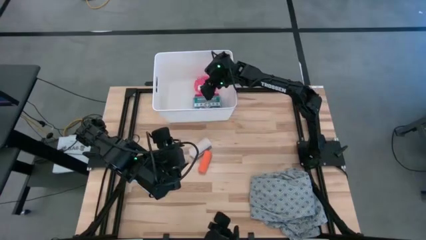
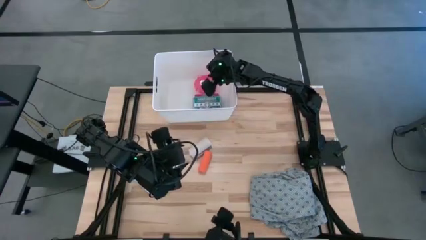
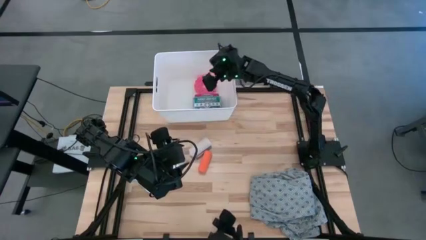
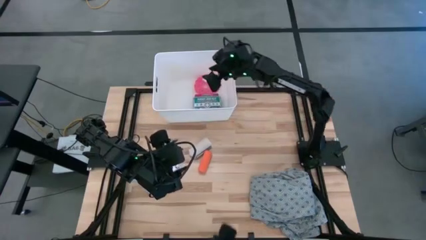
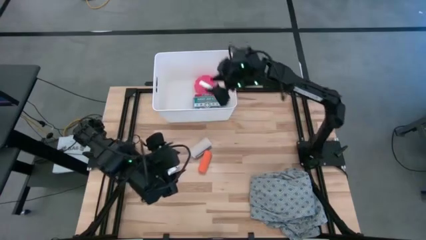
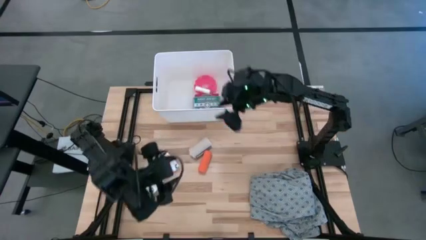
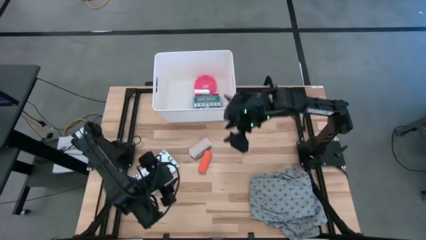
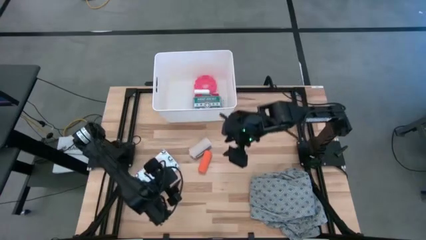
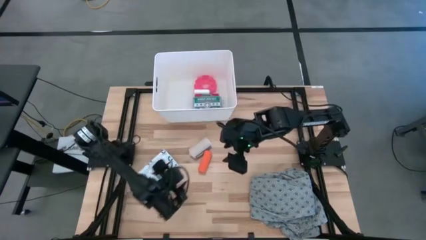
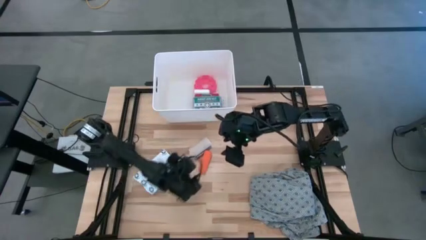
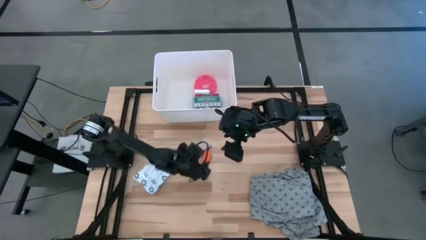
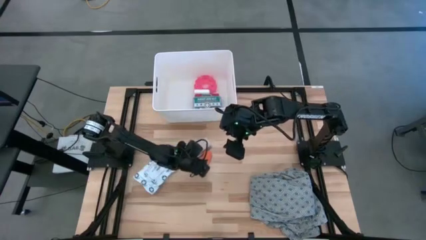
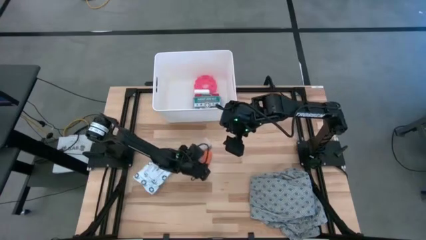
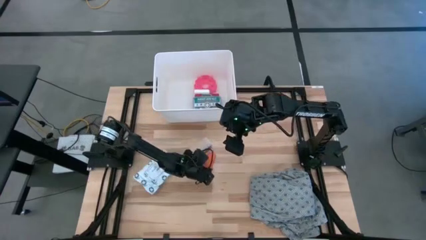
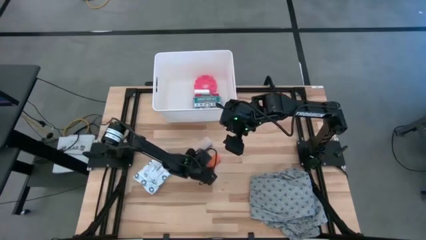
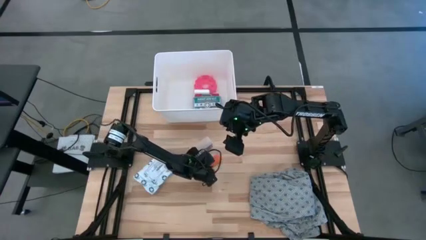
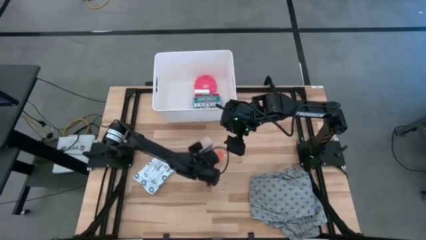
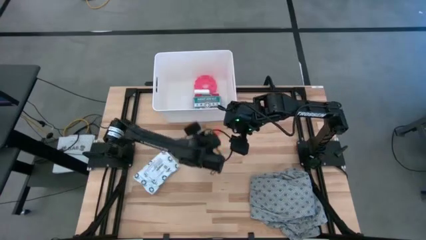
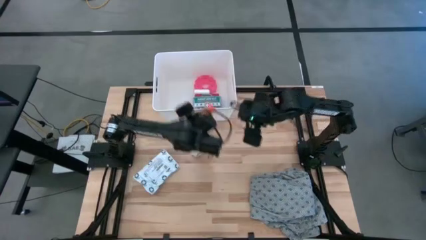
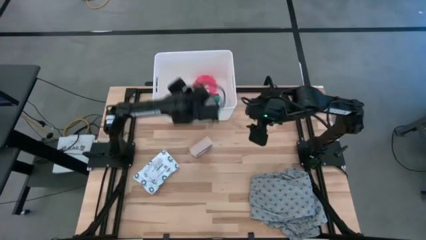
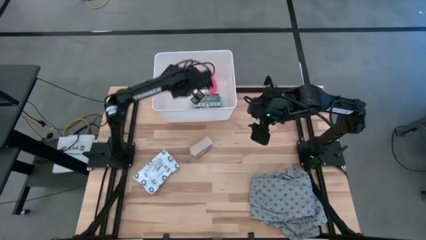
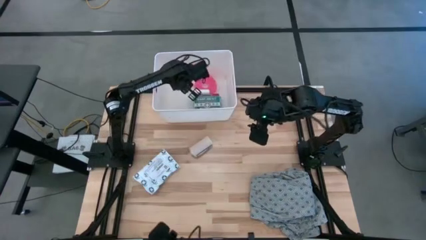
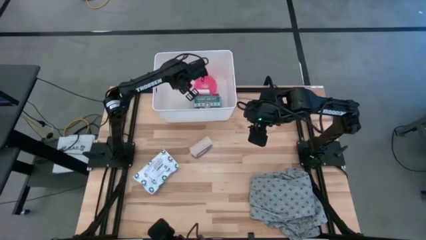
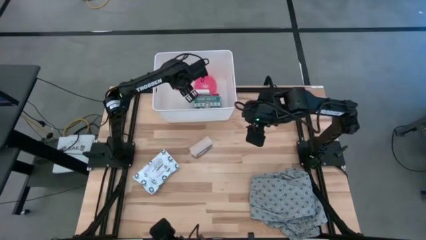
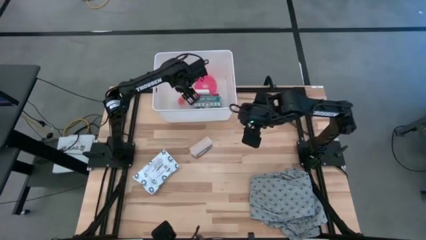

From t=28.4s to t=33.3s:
Task: Pick & place medical supplies in basket/bin
Put the orange bandage into the white bin

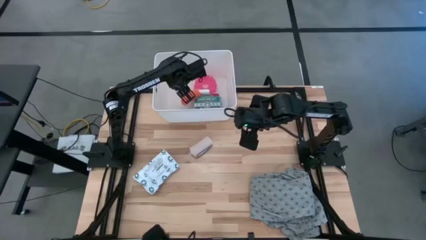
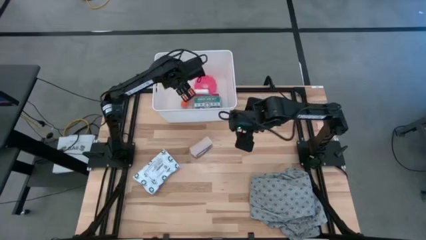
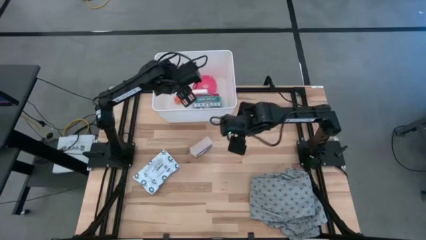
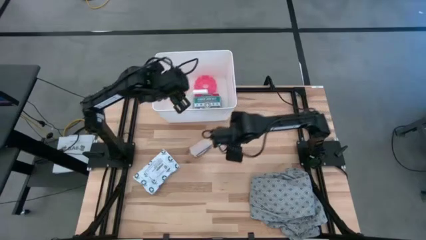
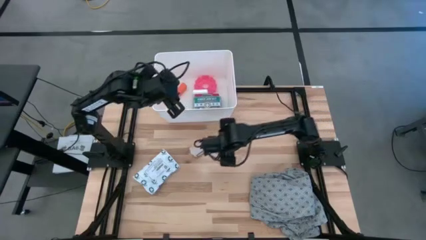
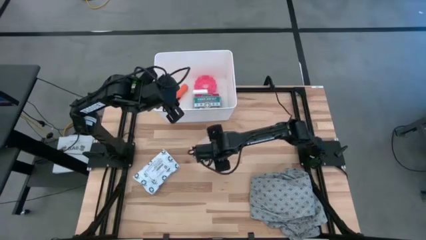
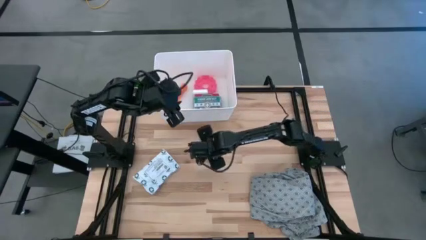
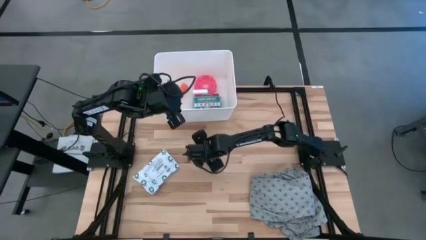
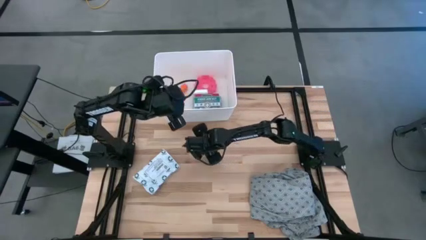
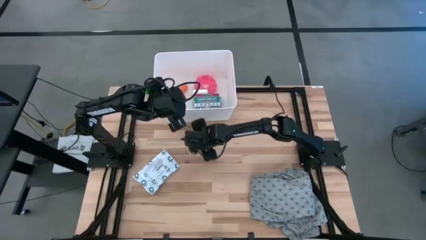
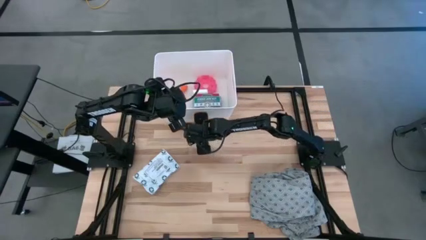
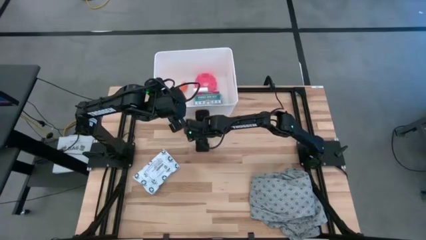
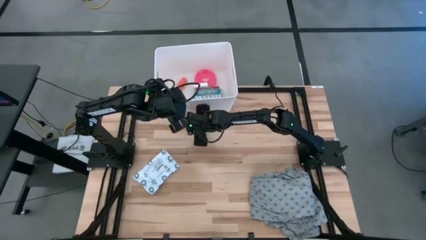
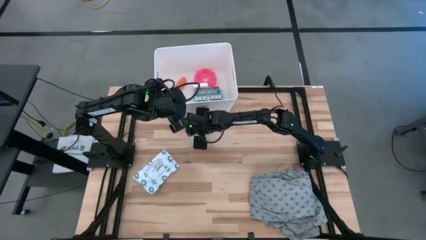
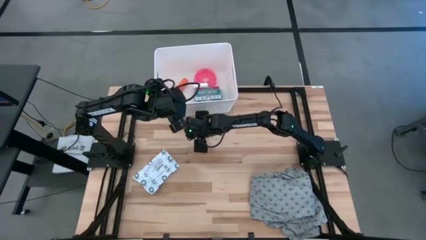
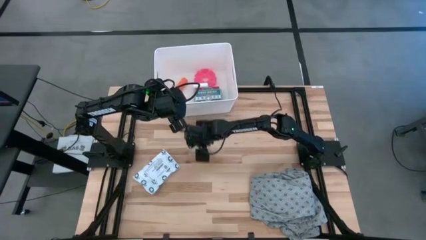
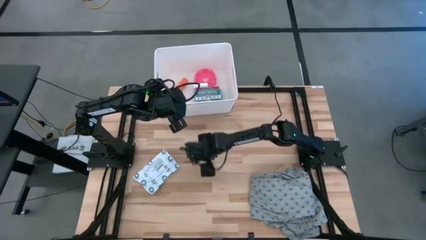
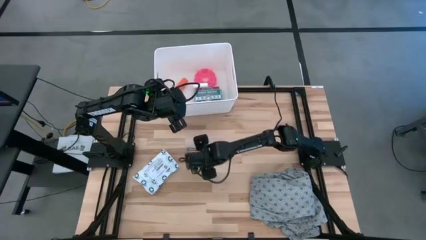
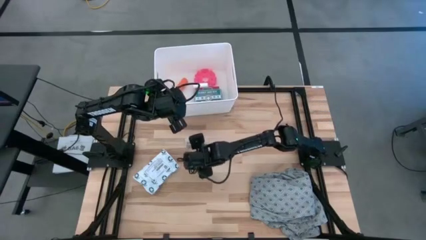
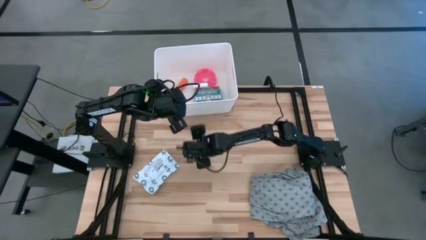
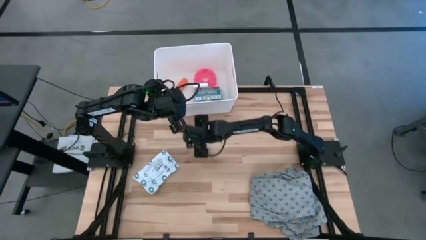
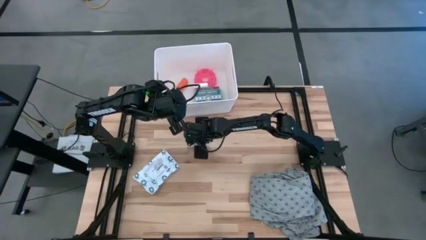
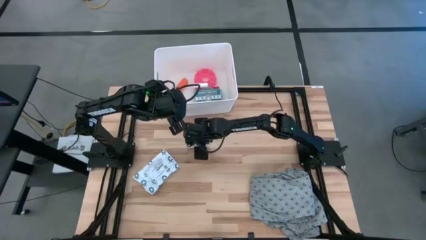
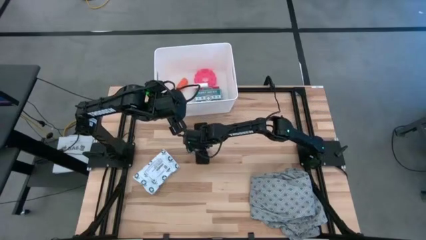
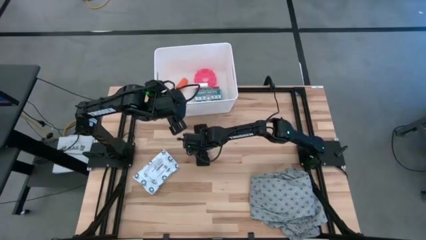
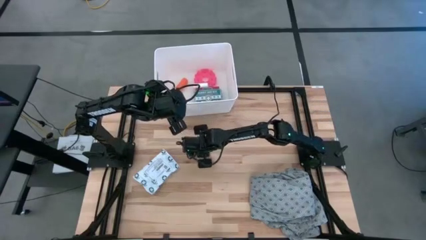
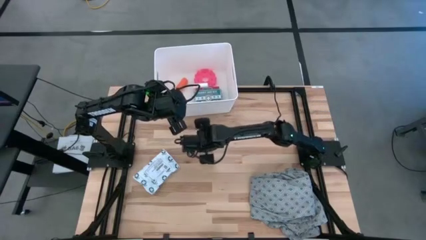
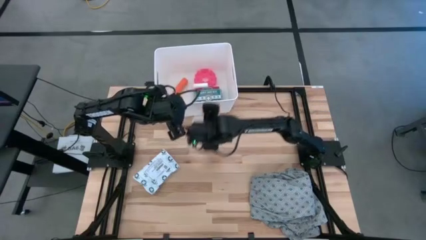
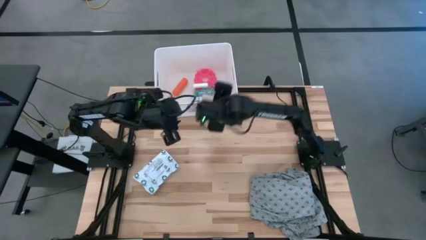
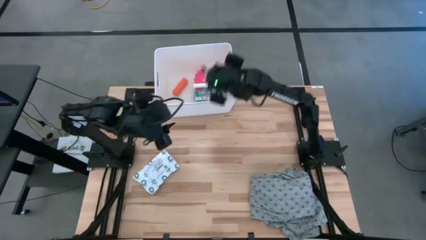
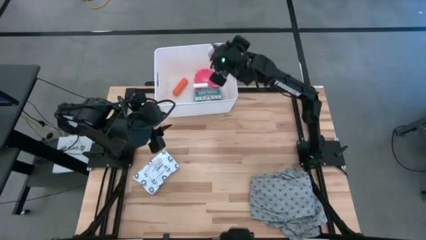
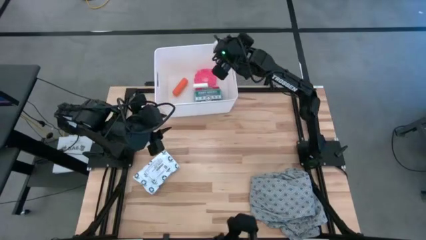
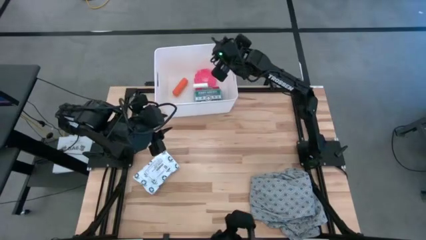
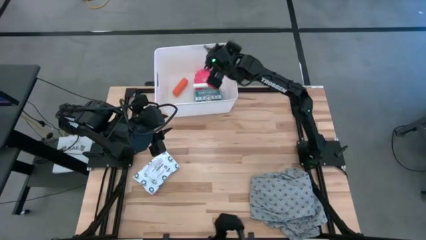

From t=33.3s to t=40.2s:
Put the white bandage into the white bin

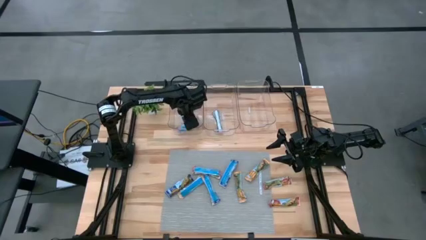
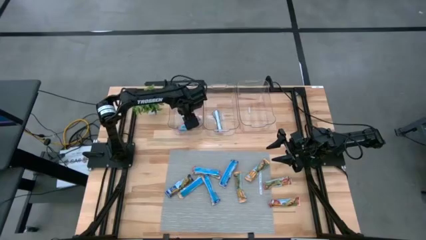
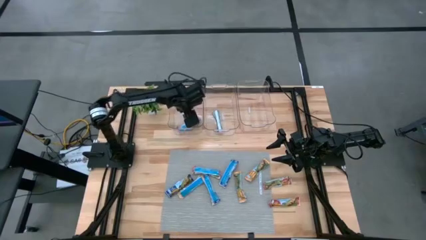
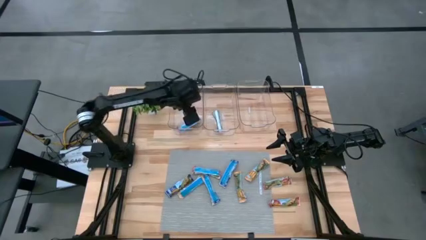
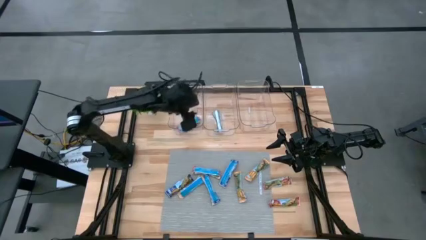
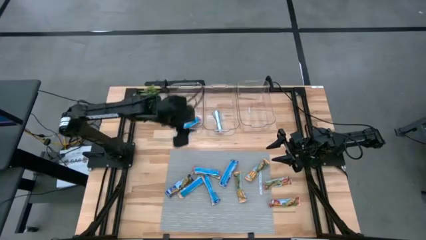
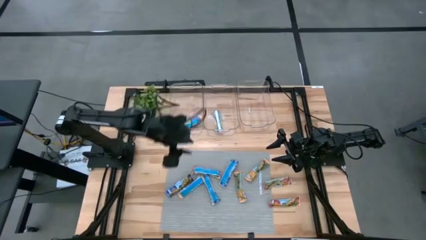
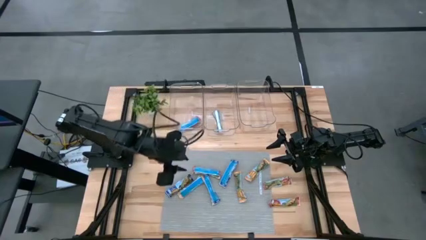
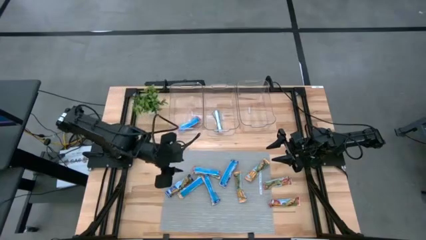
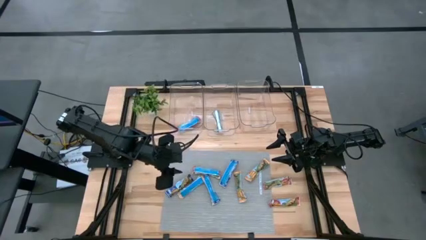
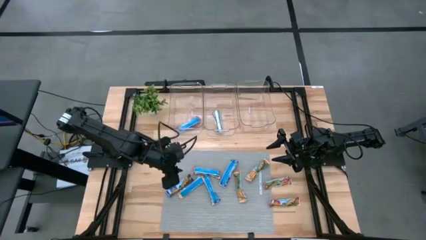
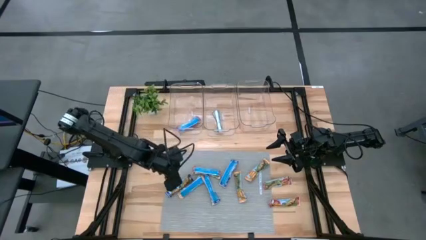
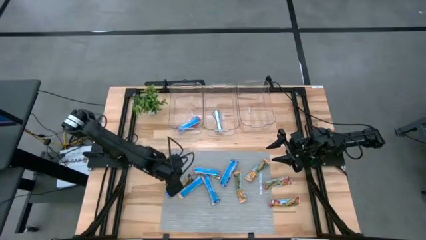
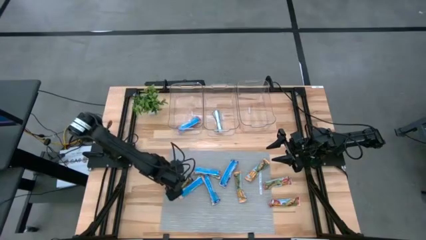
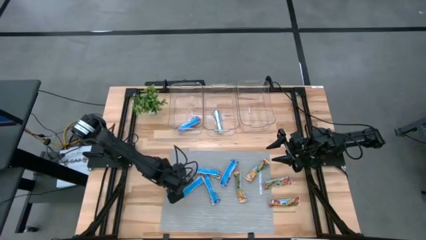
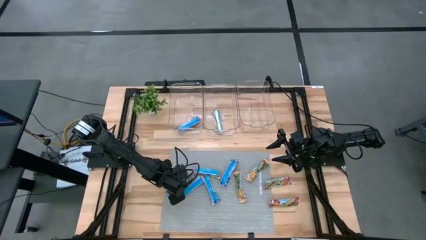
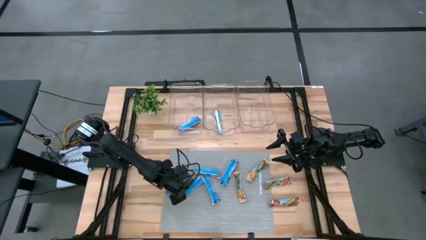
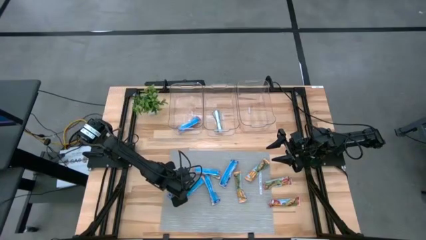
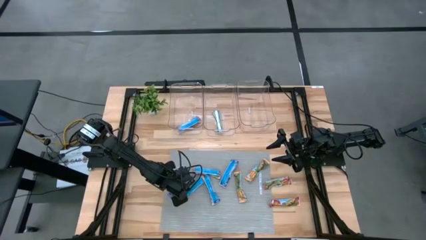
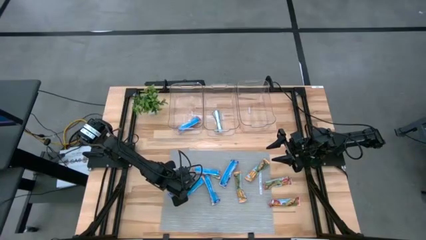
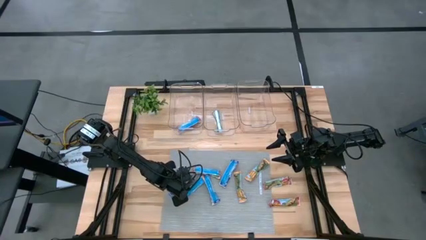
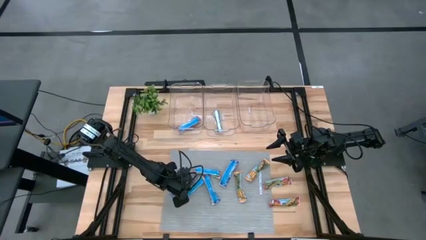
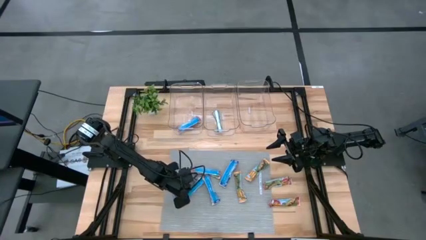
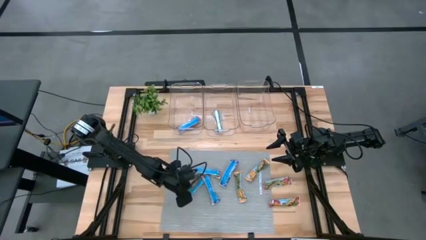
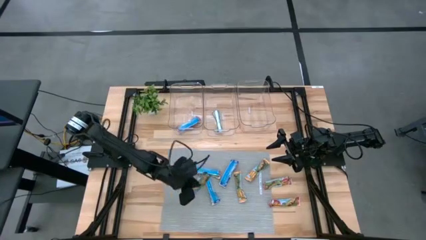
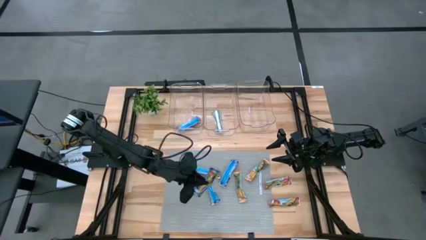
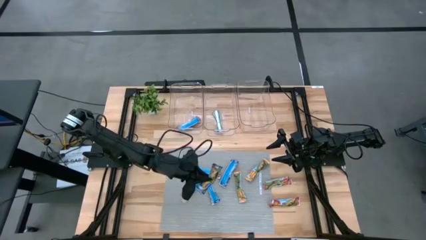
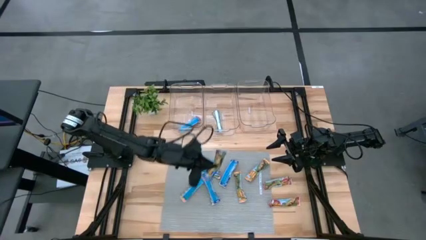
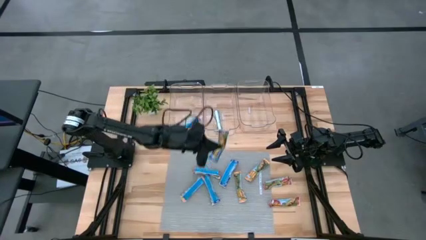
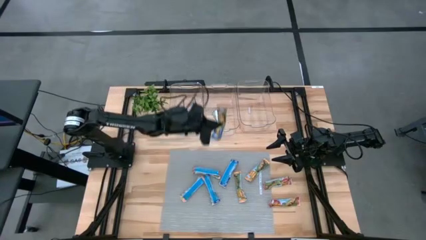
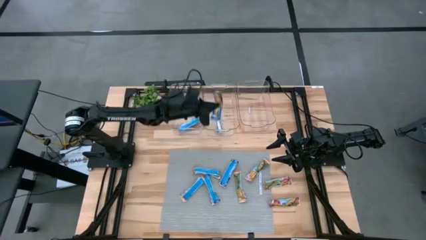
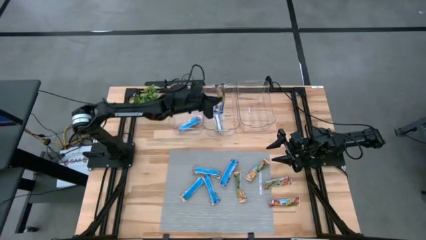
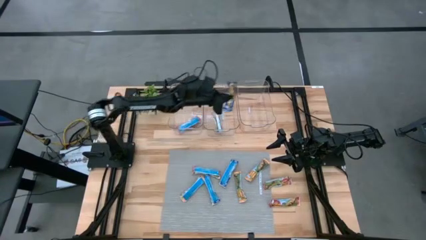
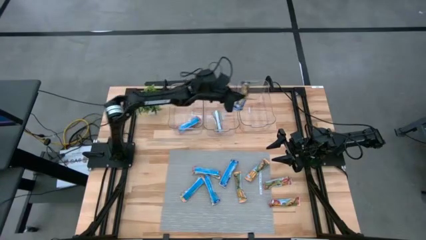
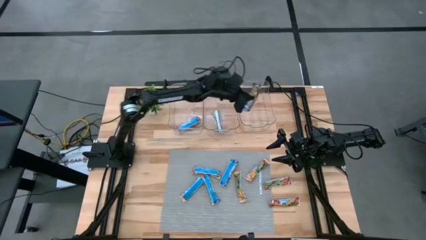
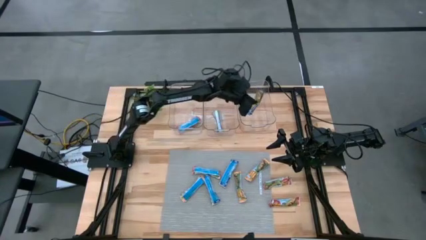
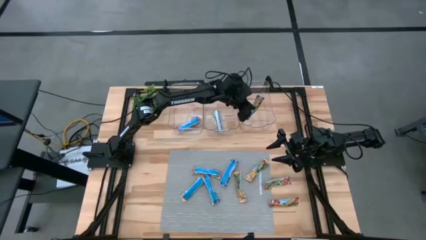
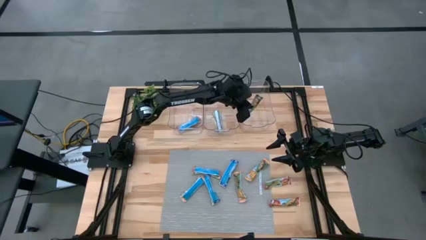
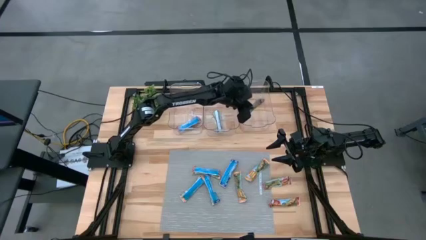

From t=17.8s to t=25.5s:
Task: Pick and place Granola Bars by type
Put the blue granola bar into the right transparent bin
